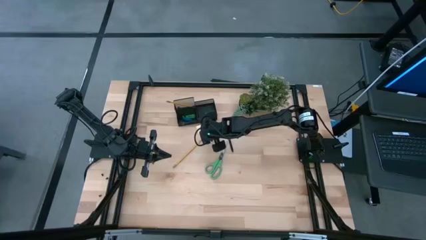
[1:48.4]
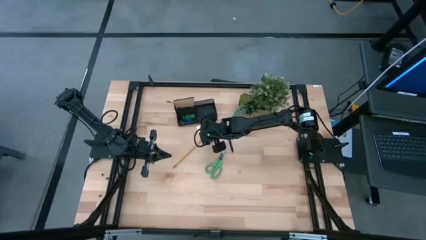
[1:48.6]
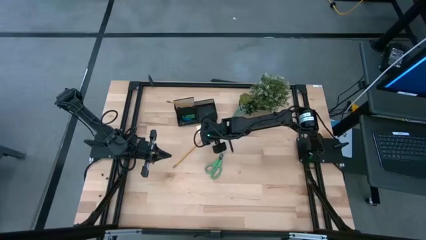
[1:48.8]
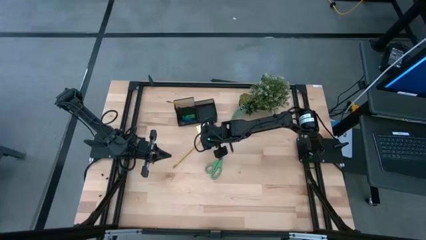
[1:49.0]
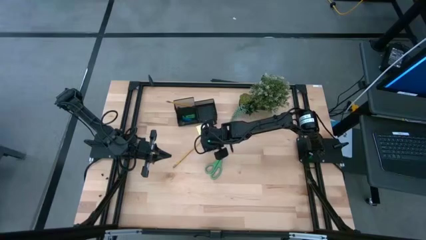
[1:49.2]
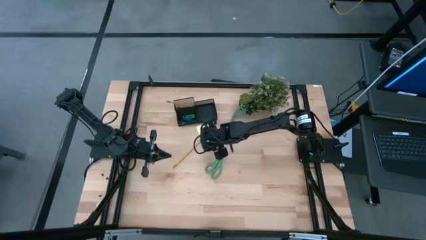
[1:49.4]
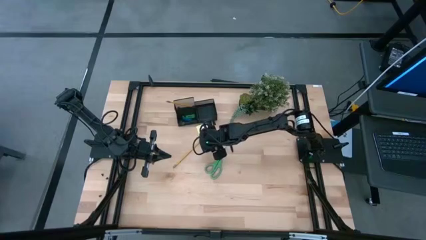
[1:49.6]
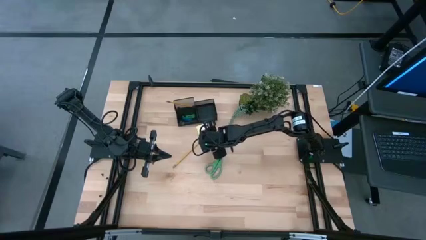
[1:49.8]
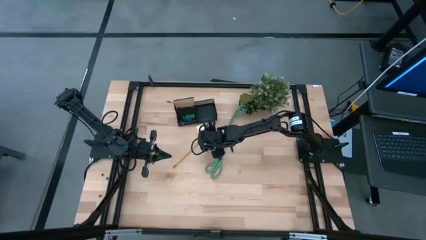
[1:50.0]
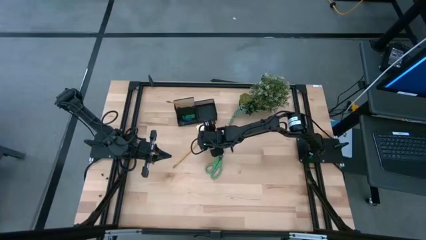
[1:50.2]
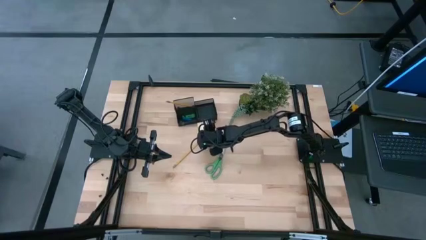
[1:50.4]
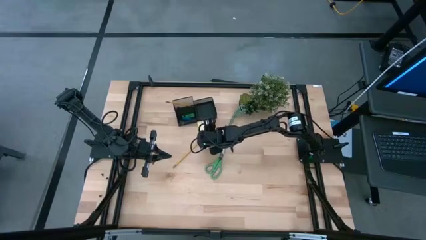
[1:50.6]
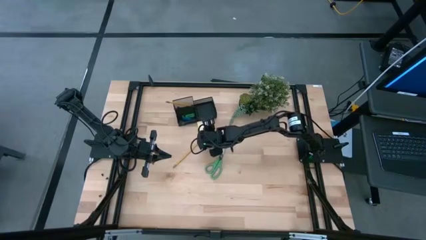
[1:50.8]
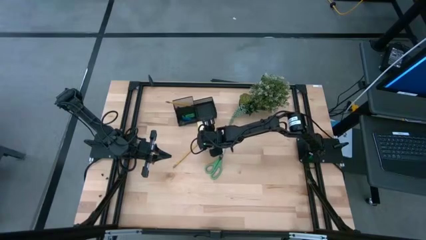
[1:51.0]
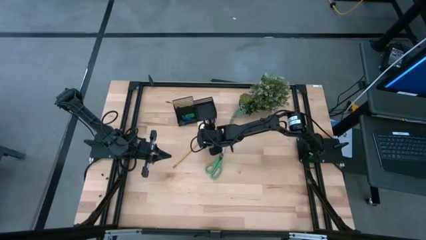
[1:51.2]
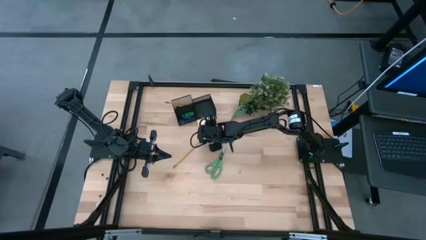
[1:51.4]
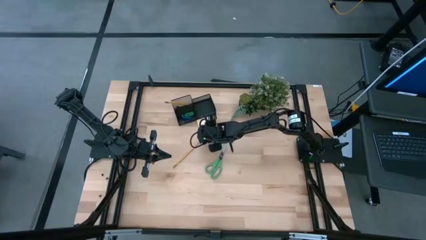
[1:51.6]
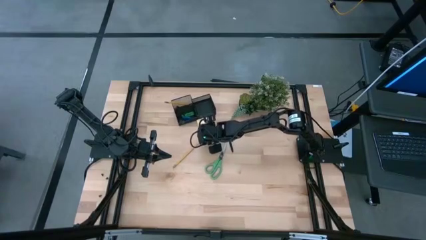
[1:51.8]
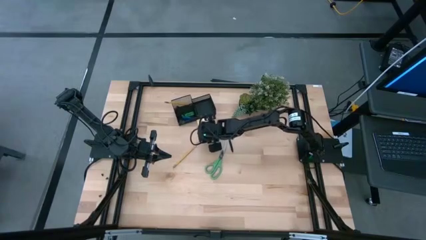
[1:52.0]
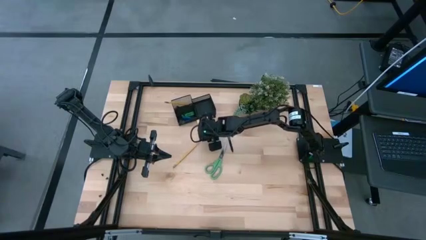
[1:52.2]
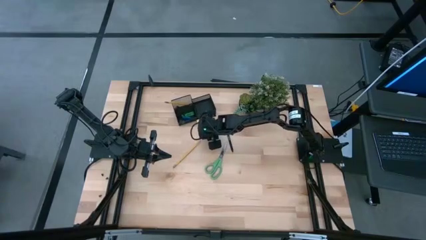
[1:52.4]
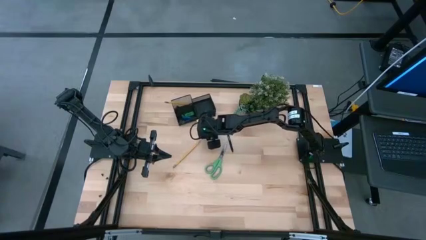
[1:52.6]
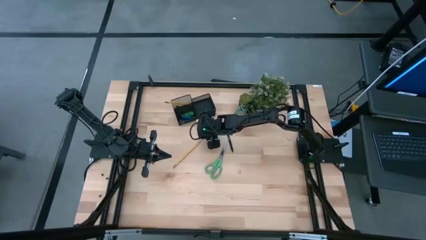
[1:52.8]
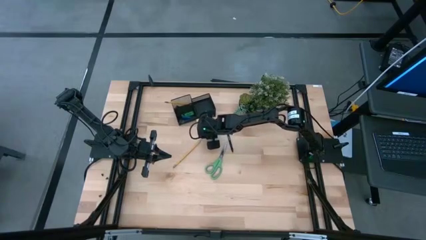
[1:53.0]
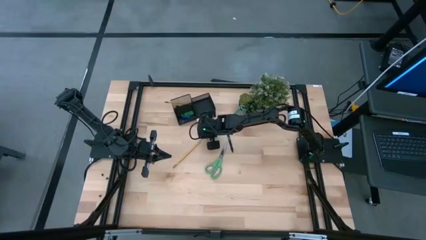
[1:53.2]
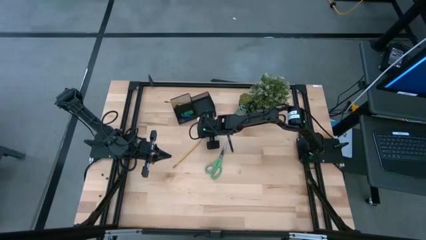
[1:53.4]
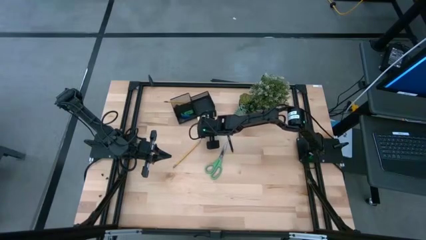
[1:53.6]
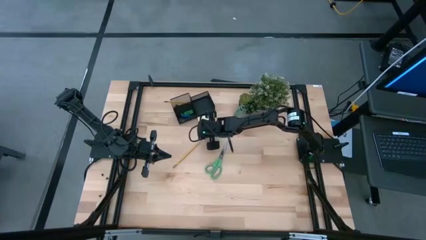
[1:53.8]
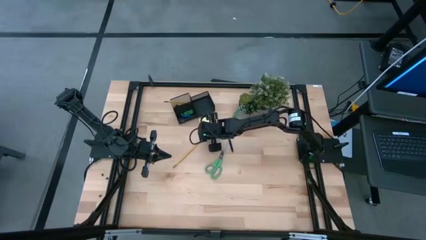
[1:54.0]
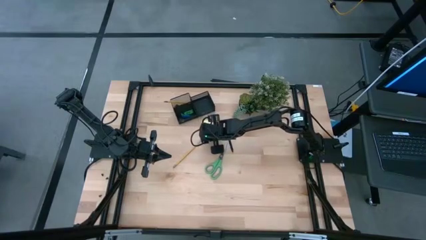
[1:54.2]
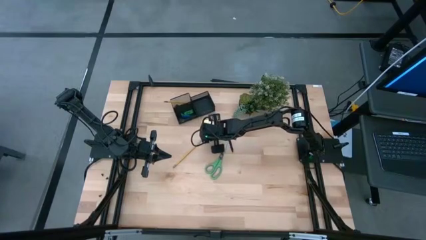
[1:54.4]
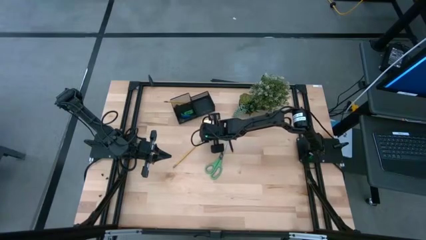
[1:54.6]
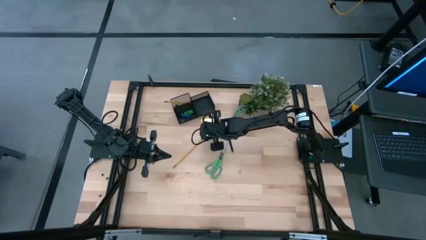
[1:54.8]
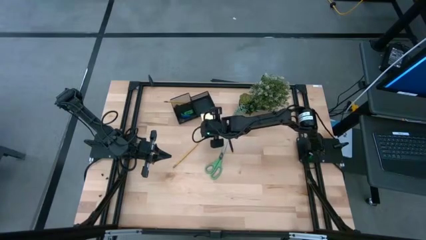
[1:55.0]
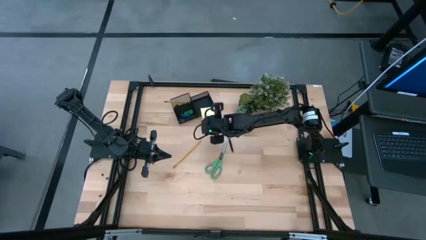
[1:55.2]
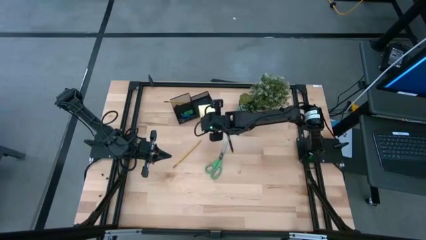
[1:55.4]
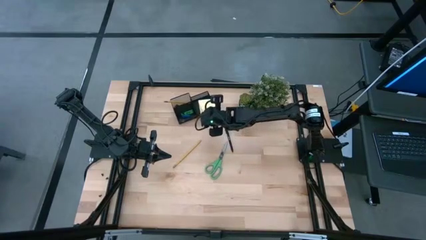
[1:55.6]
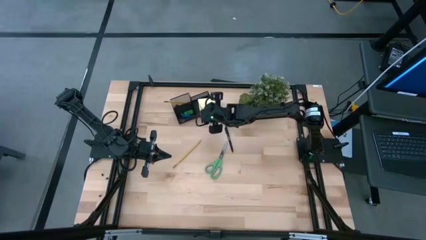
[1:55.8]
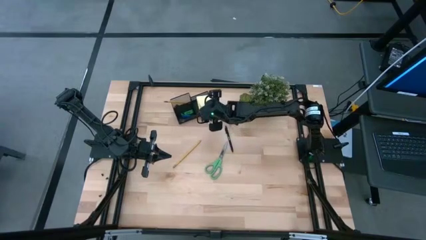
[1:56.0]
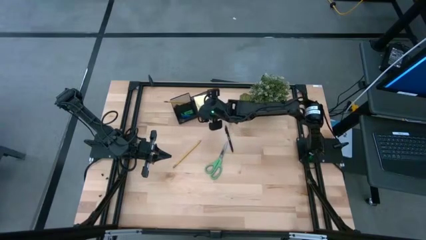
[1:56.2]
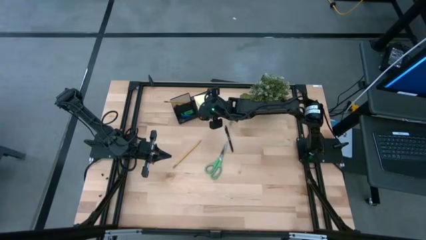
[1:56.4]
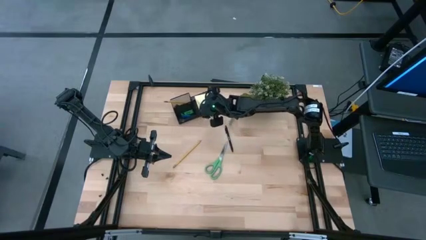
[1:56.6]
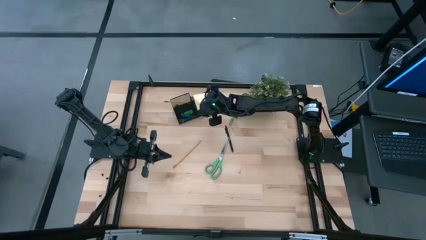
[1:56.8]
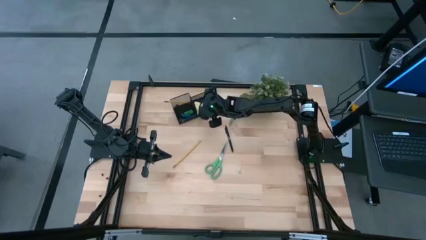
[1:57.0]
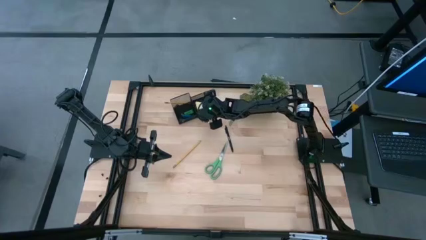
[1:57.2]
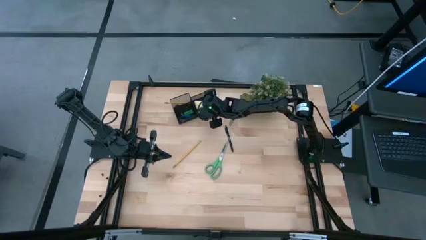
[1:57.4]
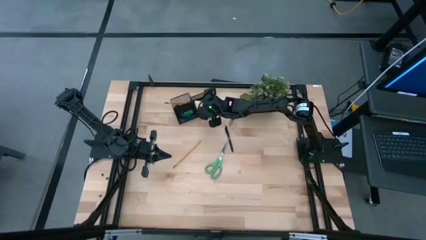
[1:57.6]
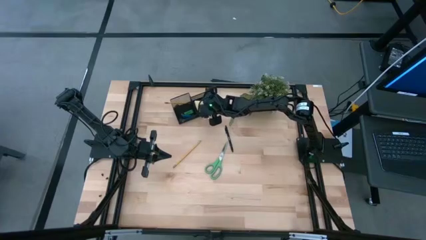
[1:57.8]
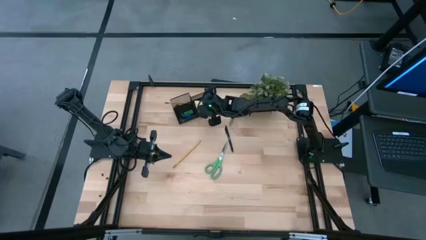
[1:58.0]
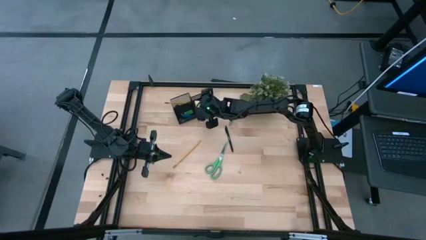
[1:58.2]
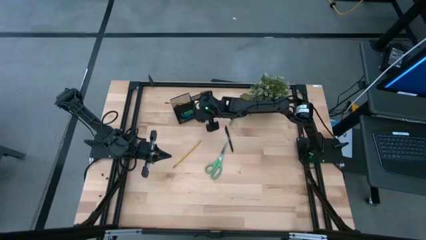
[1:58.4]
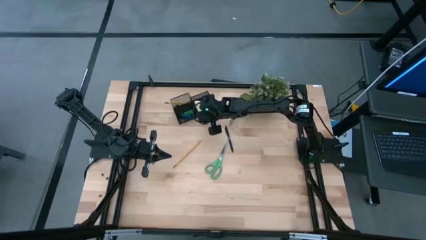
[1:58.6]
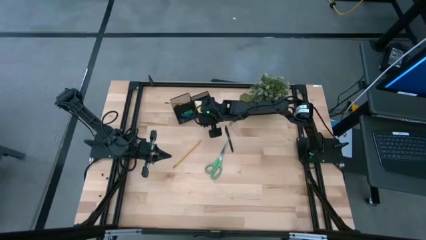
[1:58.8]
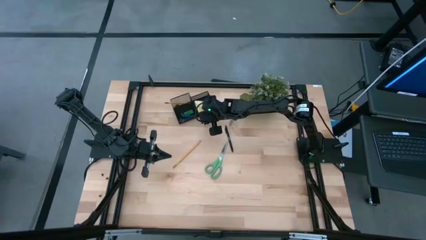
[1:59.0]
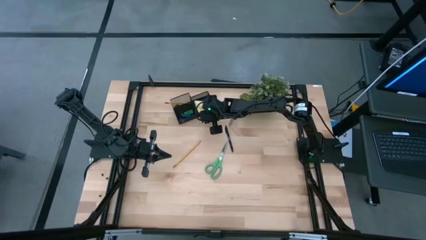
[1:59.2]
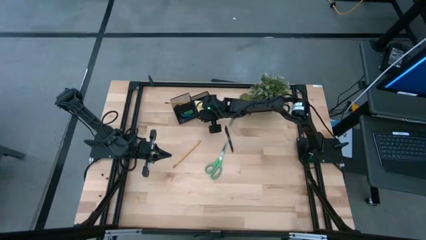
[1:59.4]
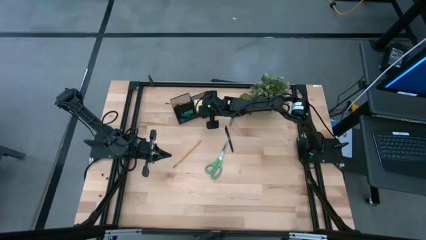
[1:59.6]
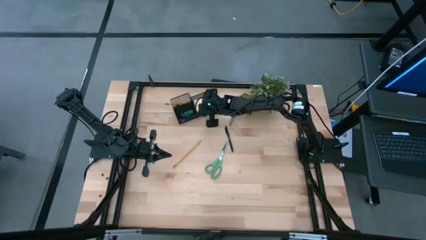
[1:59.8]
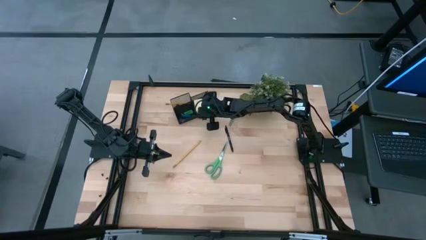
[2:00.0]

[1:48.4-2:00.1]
Task: Pick and place office supplies into organizer
Put the yellow sticky notes into the black desk organizer

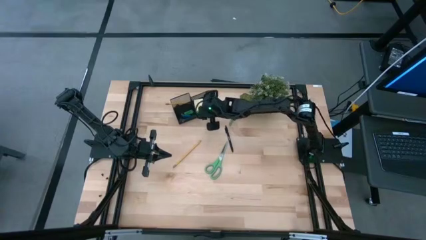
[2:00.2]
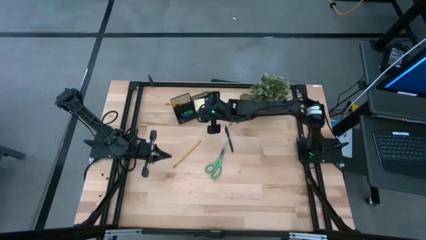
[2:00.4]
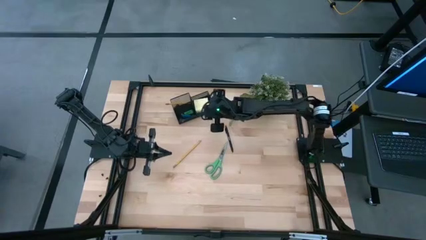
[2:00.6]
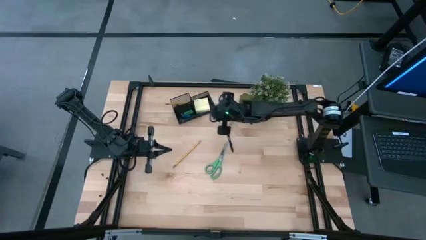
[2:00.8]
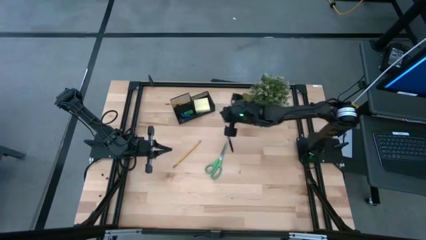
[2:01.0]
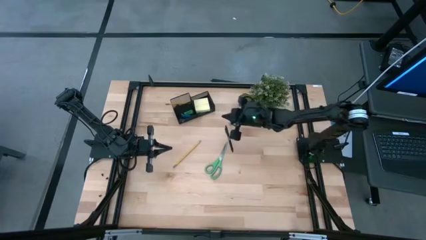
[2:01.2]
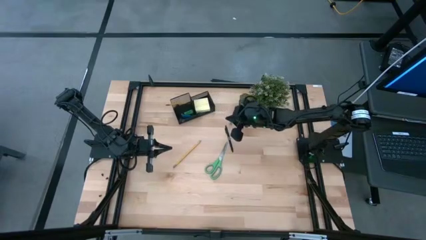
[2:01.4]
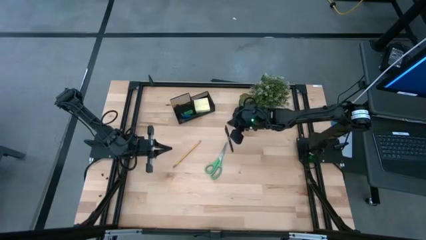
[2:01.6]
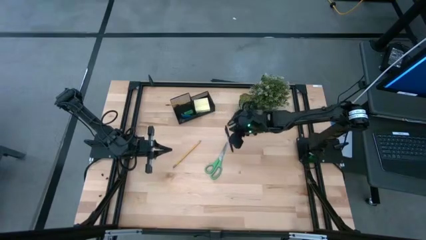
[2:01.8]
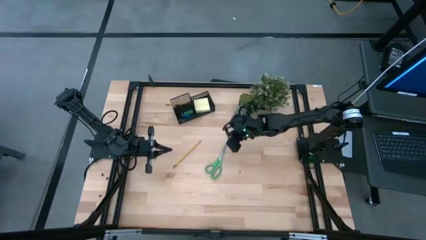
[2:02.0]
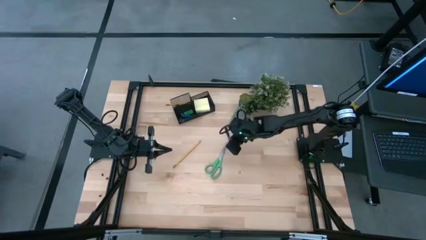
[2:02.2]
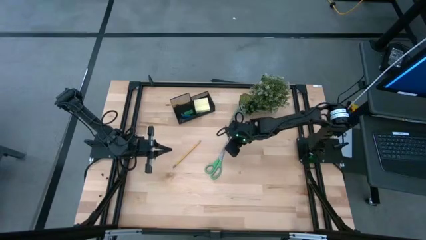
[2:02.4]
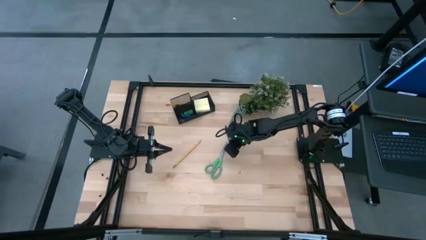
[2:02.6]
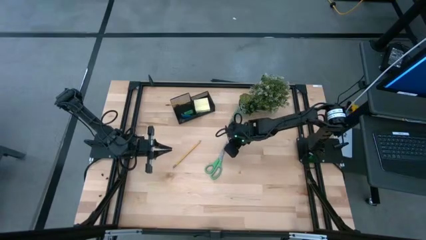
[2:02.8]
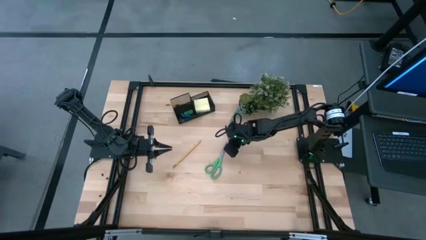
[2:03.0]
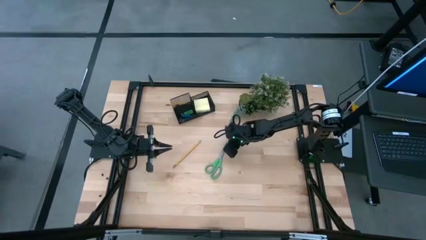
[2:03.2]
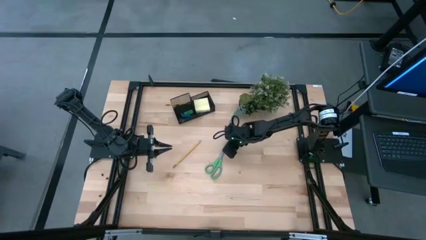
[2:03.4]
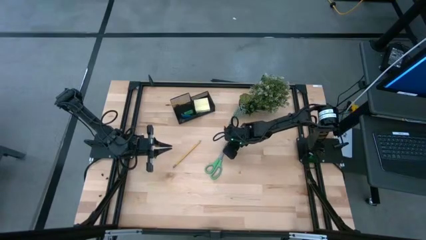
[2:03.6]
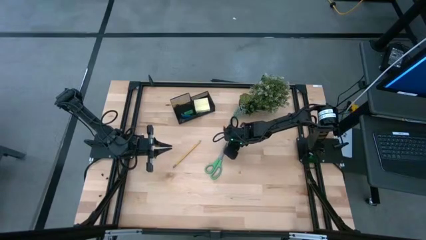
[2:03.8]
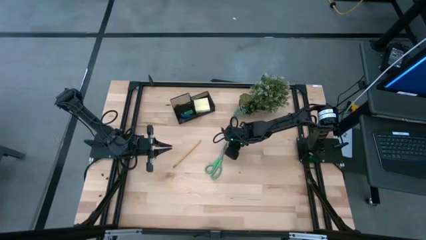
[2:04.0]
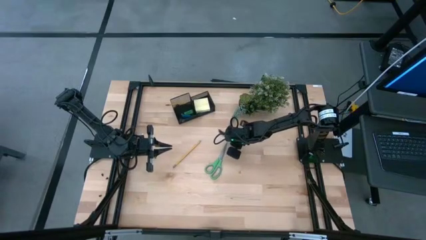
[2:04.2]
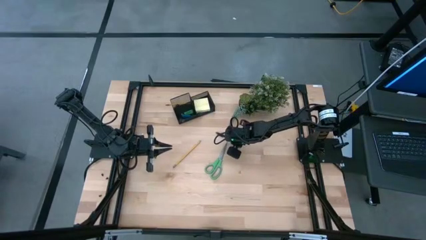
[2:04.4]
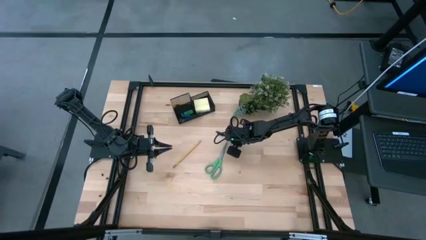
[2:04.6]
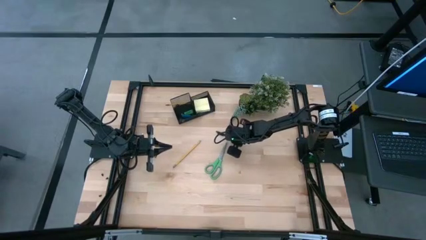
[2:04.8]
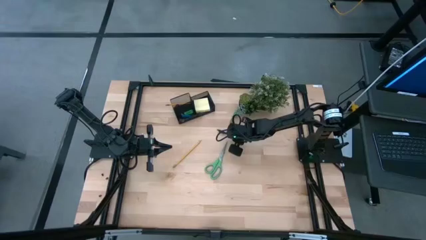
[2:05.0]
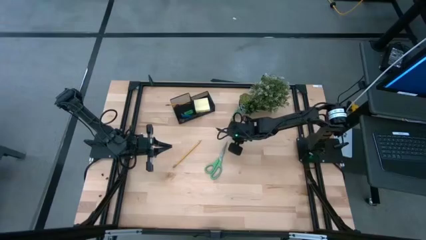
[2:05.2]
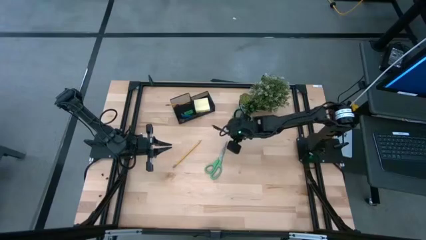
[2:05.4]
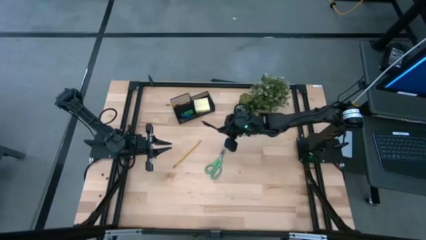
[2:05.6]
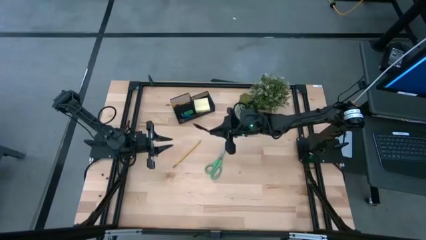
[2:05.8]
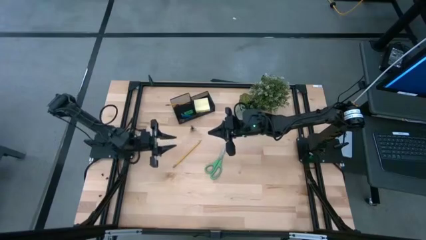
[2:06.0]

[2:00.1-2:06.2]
Put the black ball pen into the black desk organizer
